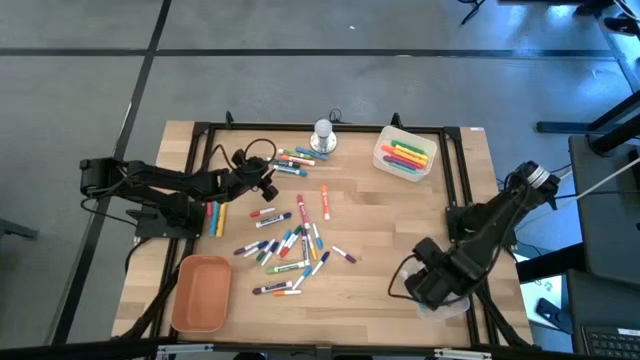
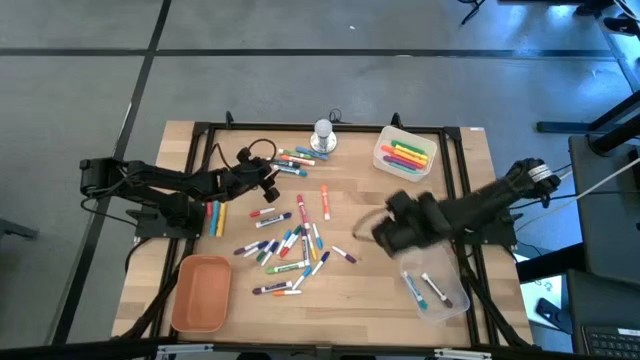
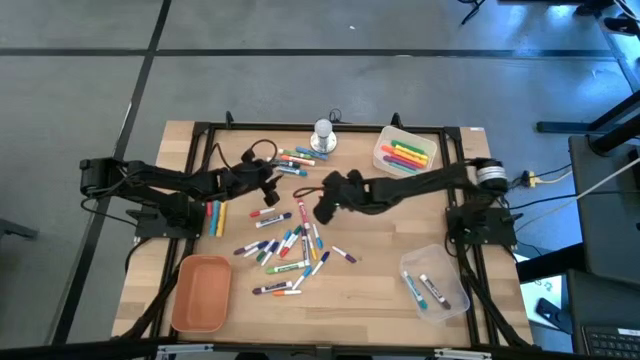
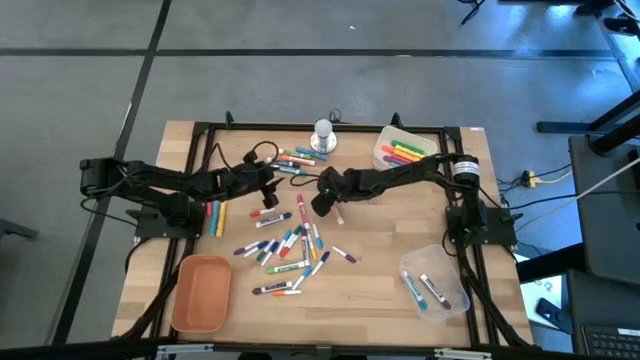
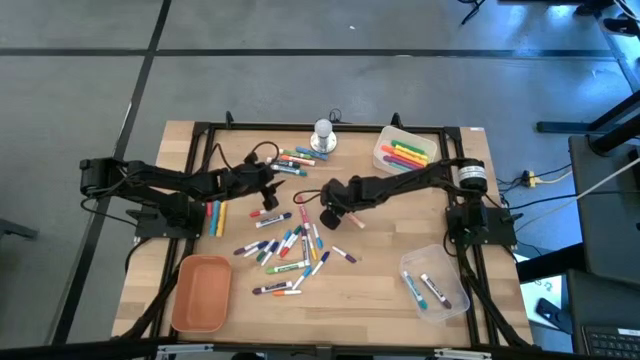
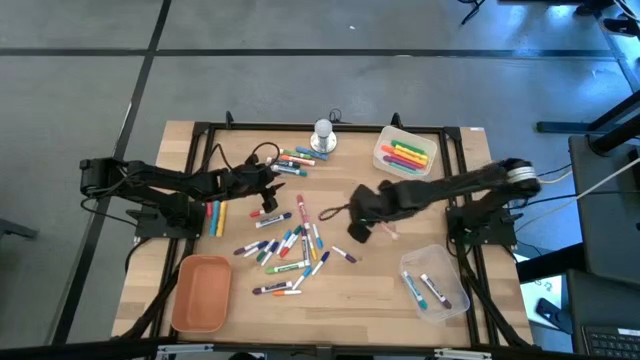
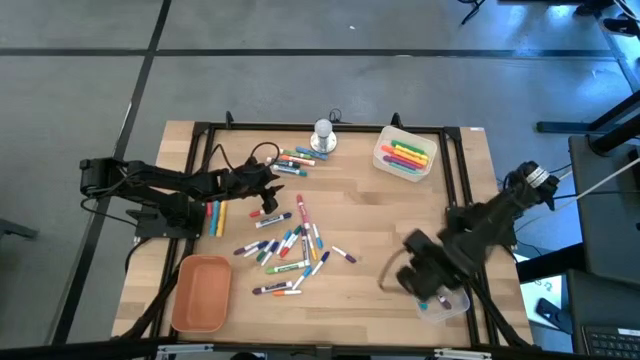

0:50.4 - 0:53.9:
Task: Pick & Place Markers
Put the medium orange marker pen into the transparent bin

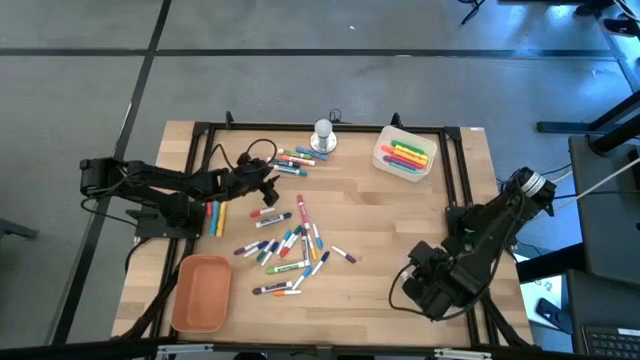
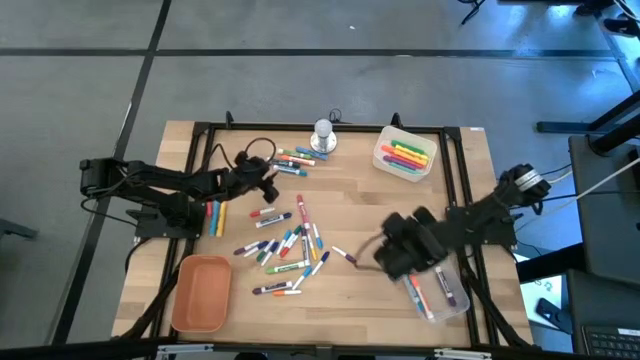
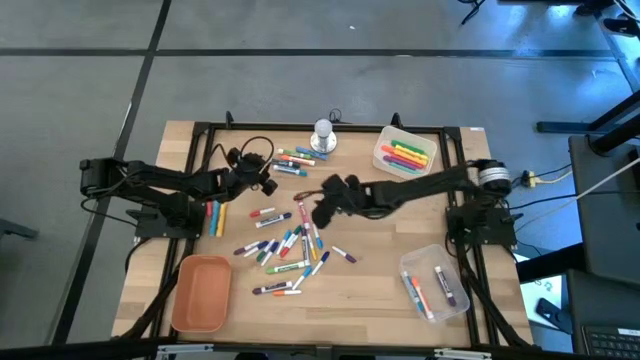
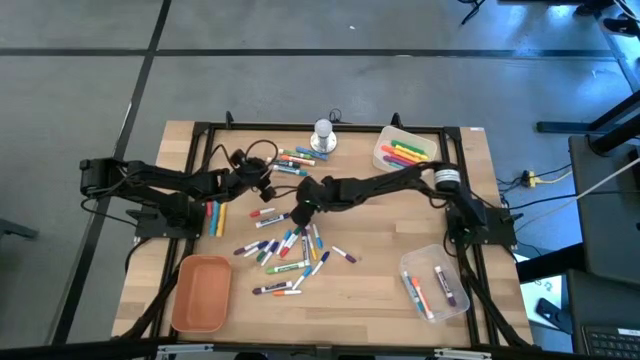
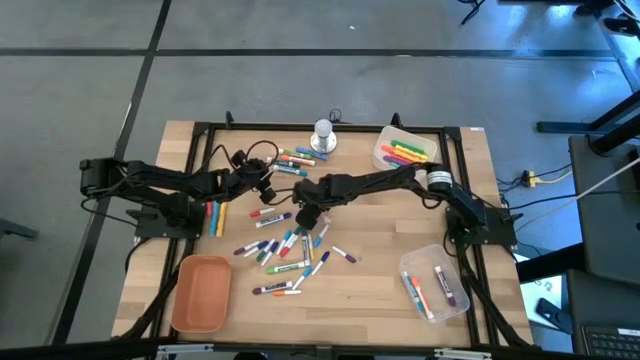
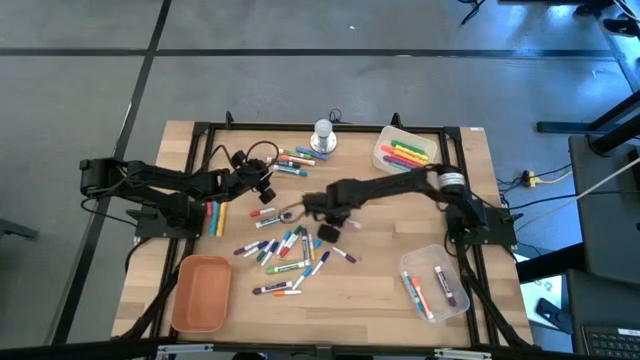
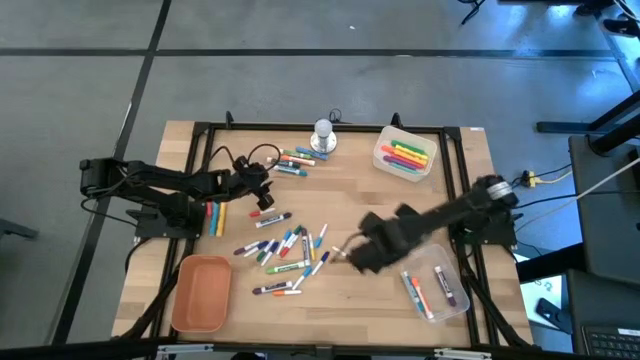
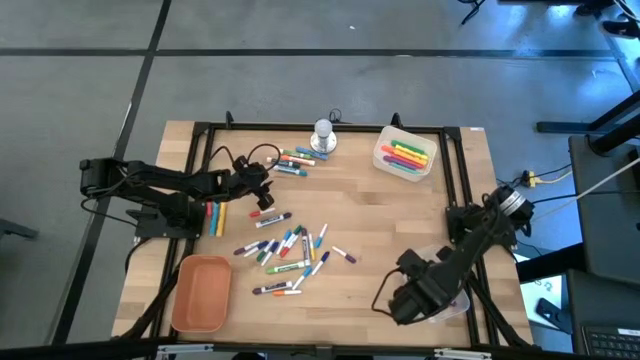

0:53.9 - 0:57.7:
Put the medium pink marker pen into the transparent bin

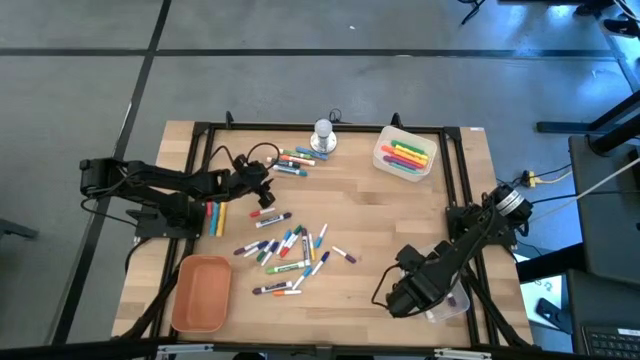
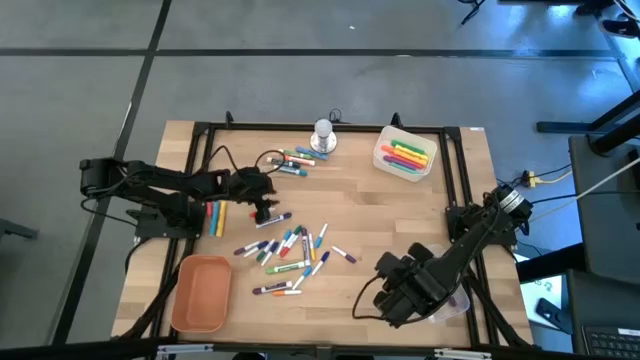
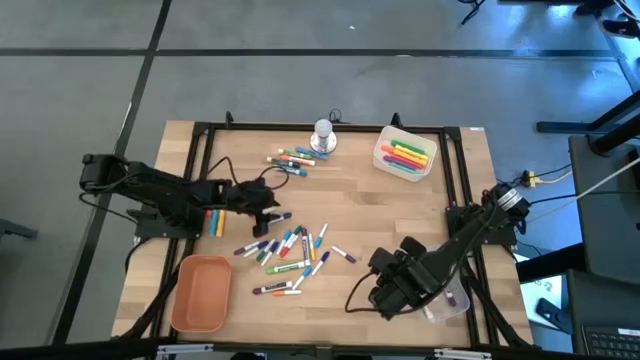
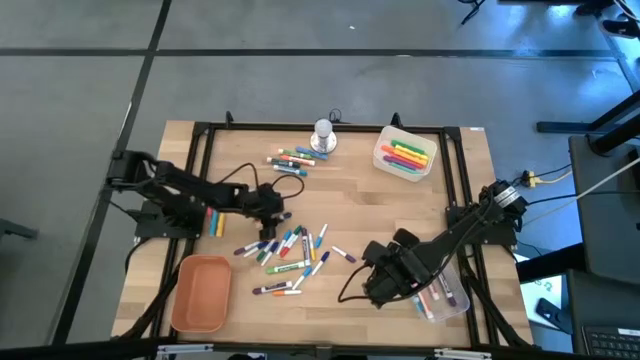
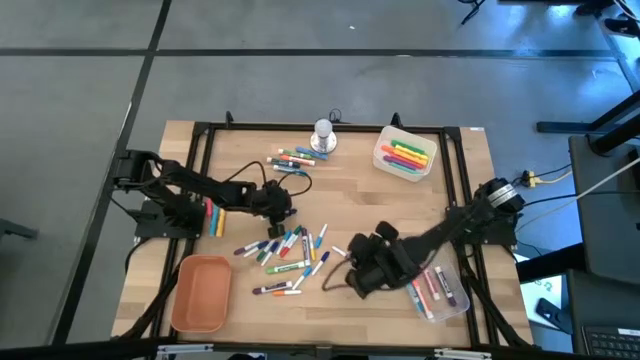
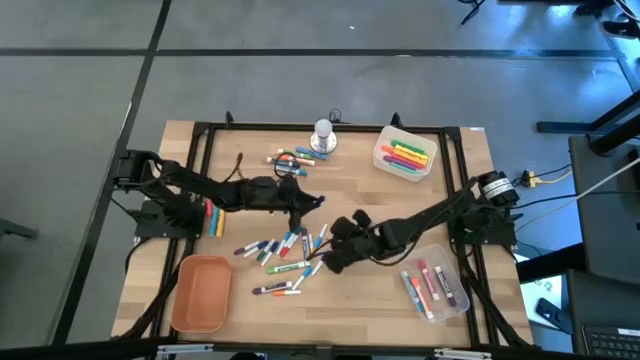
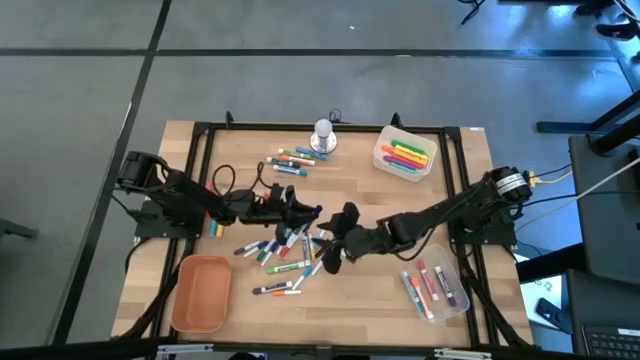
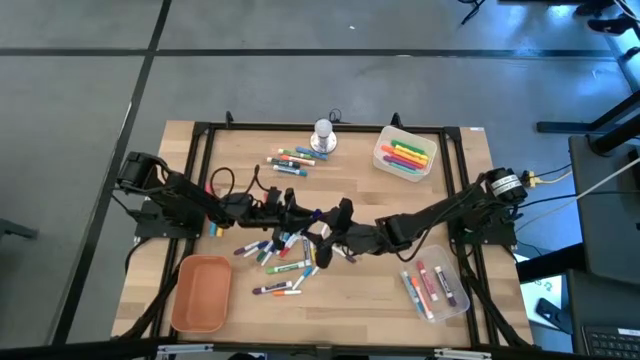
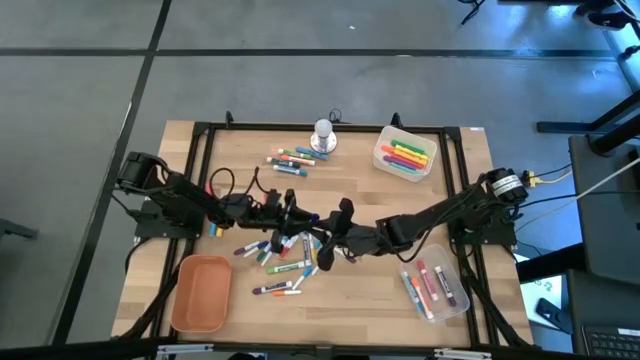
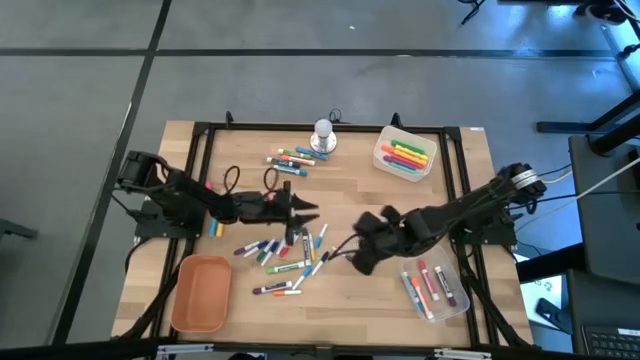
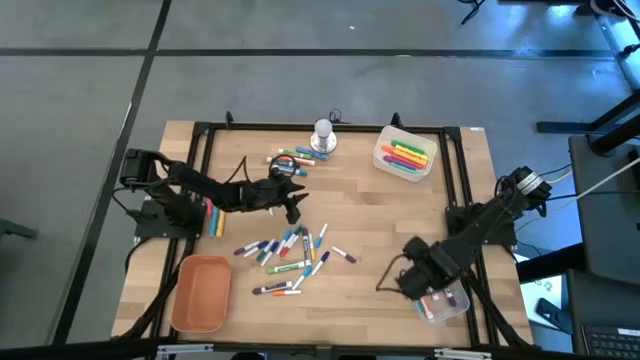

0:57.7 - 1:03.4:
Put the medium blue marker pen into the transparent bin

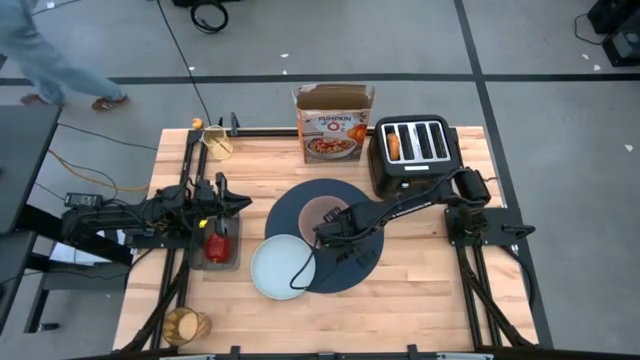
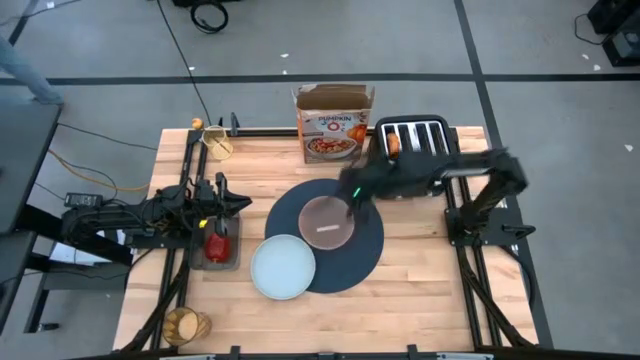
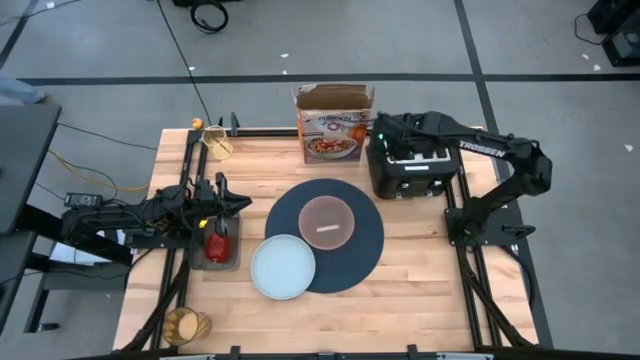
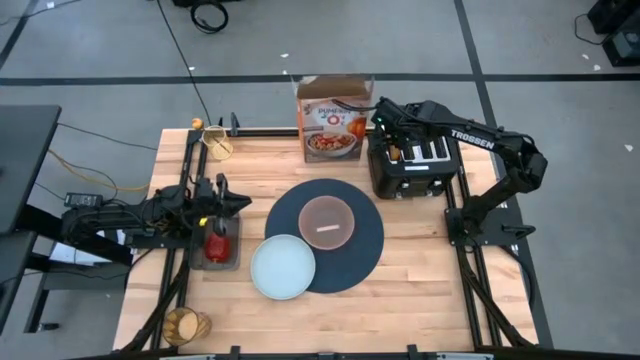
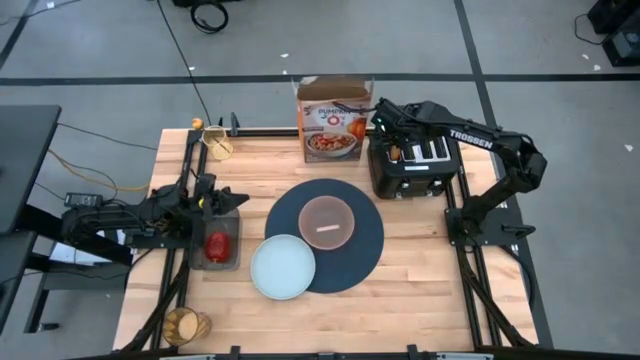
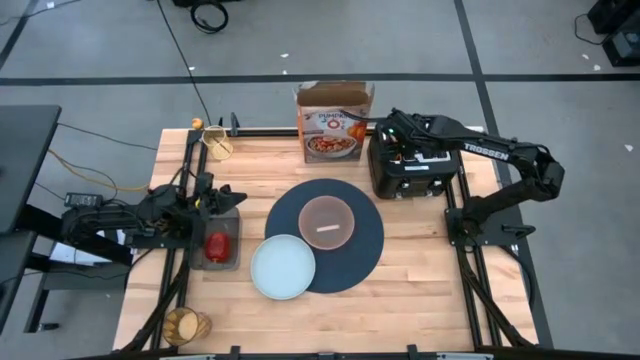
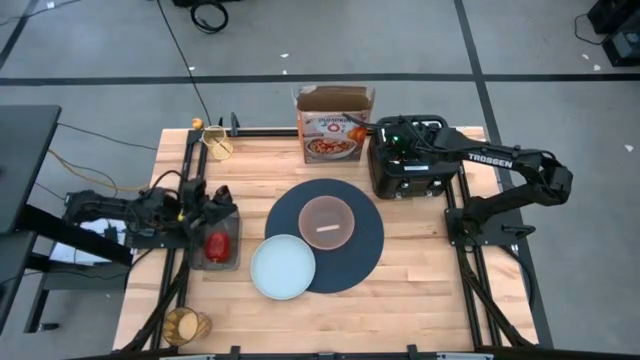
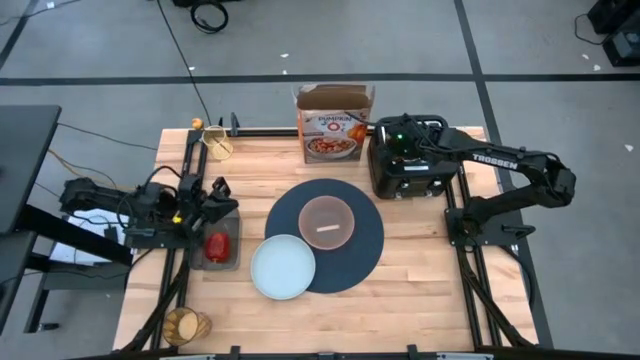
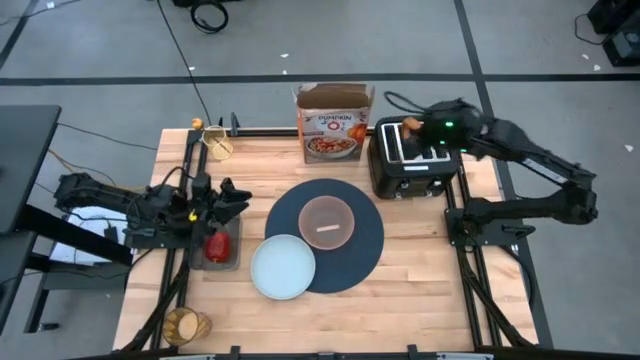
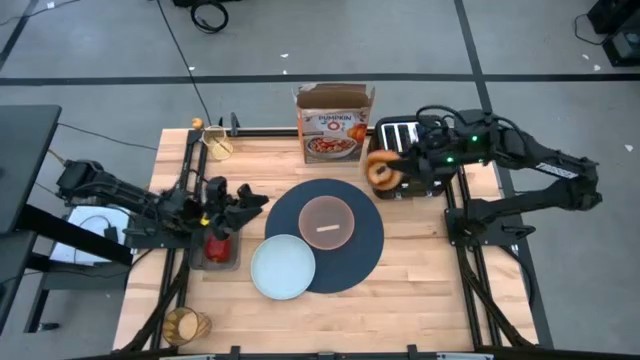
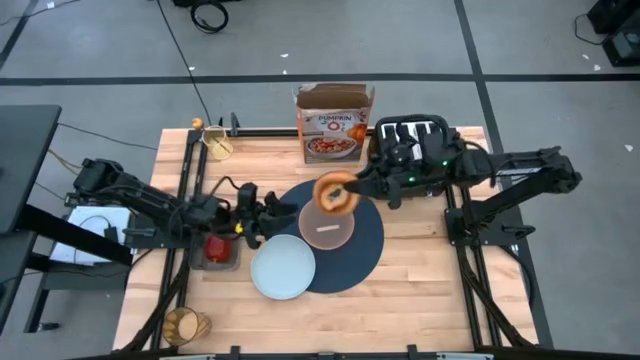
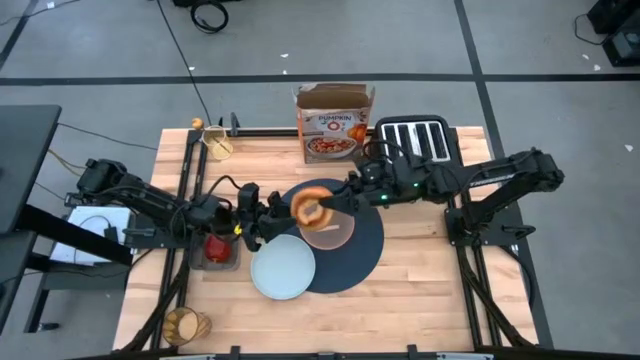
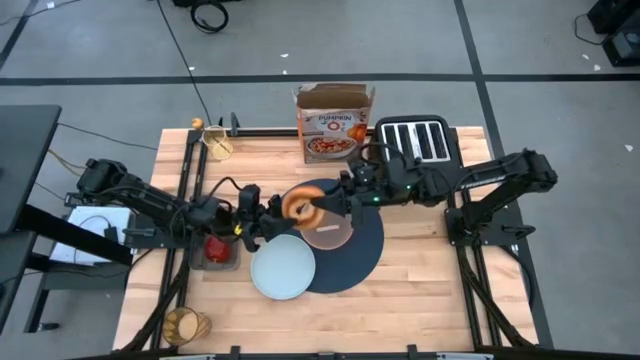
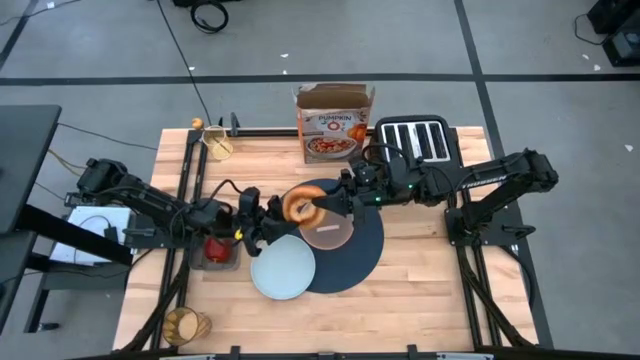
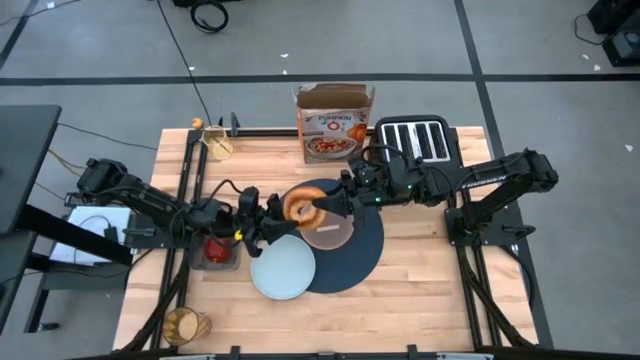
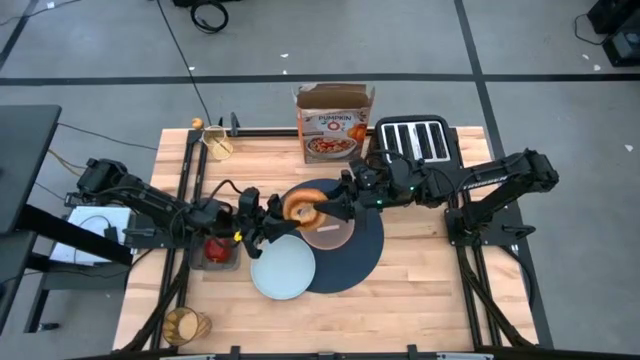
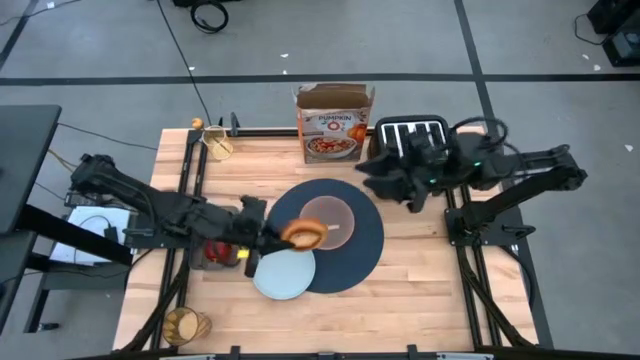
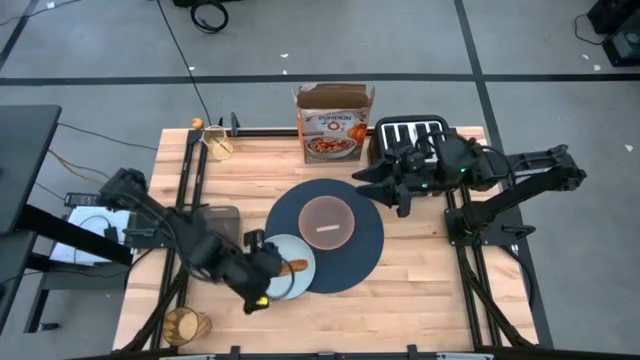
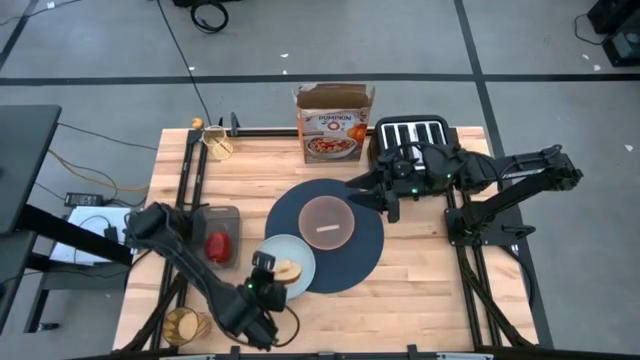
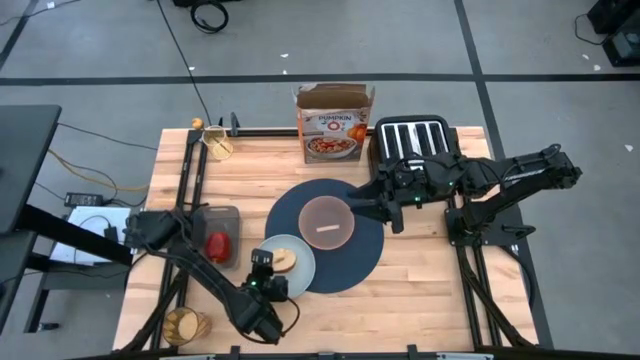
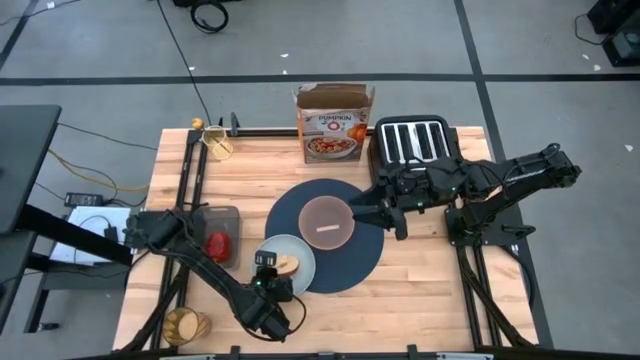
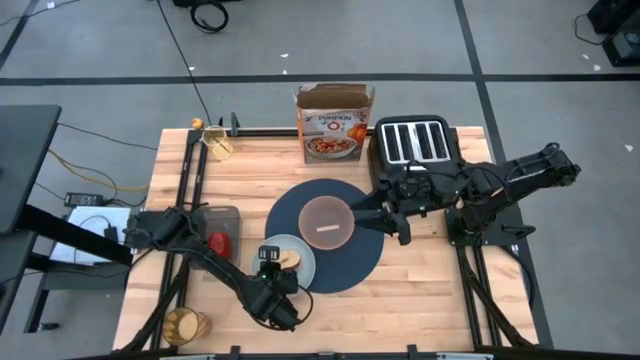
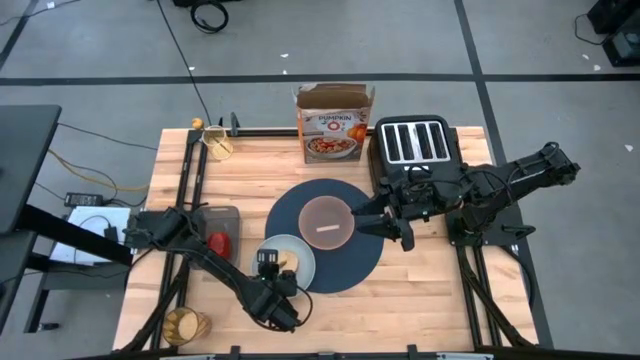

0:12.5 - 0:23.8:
Task: Arrange a breakfast setting
Put the toasted bagel from the toaster on the blue plate
